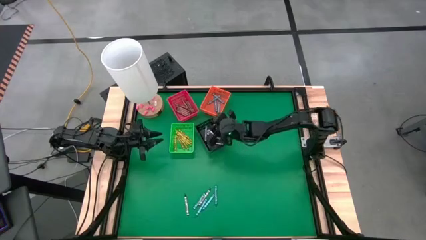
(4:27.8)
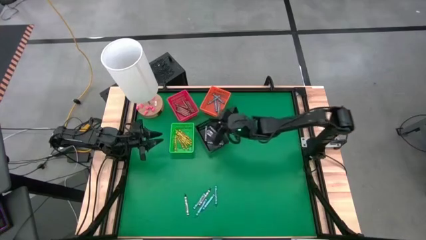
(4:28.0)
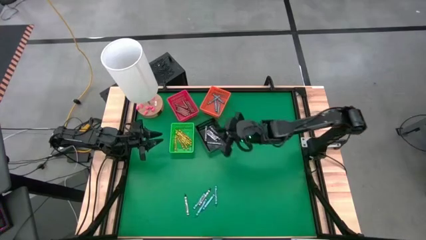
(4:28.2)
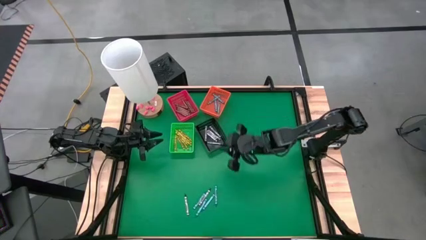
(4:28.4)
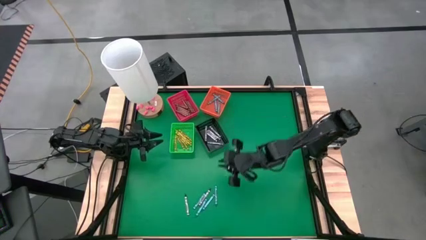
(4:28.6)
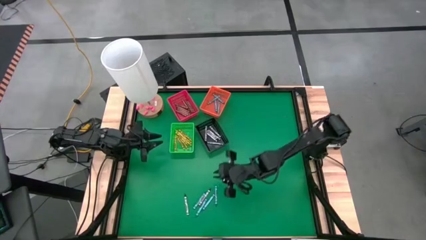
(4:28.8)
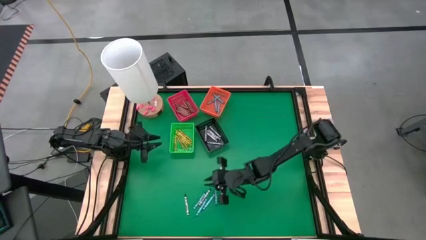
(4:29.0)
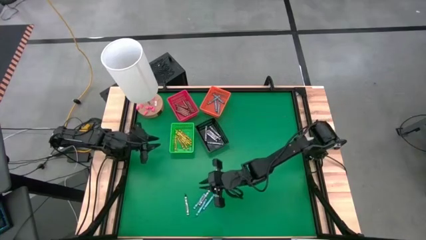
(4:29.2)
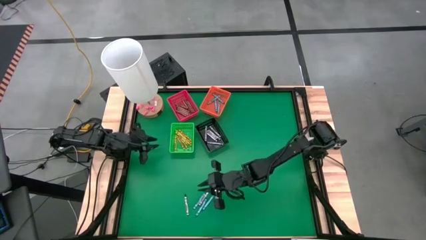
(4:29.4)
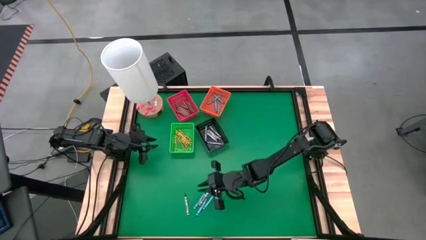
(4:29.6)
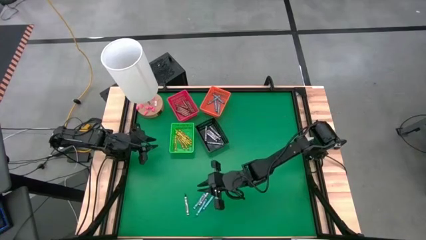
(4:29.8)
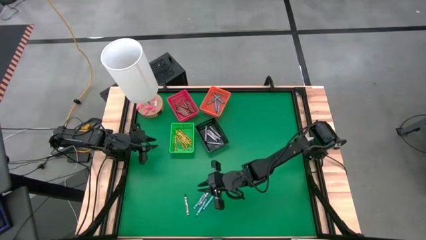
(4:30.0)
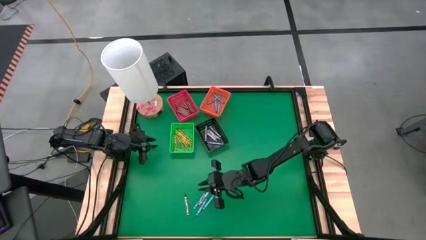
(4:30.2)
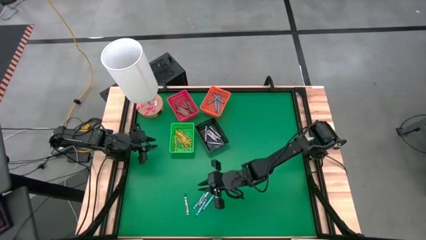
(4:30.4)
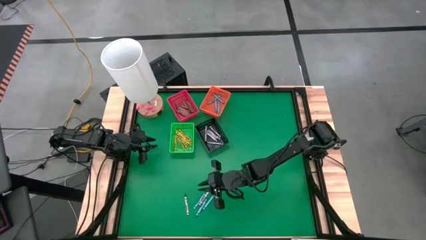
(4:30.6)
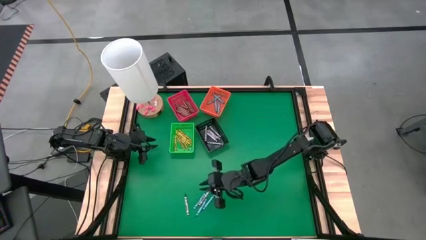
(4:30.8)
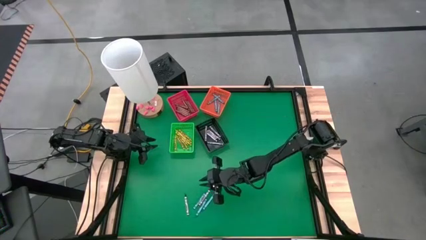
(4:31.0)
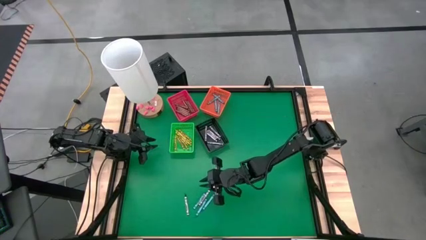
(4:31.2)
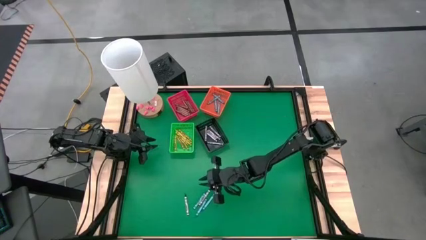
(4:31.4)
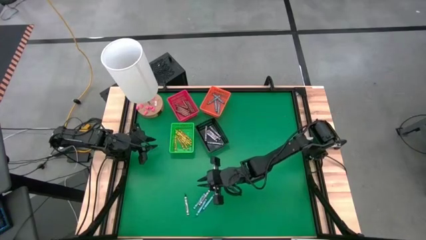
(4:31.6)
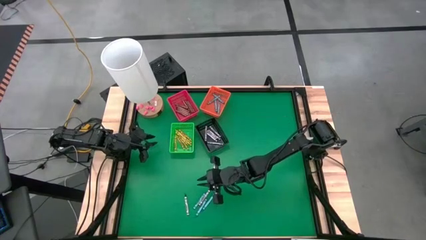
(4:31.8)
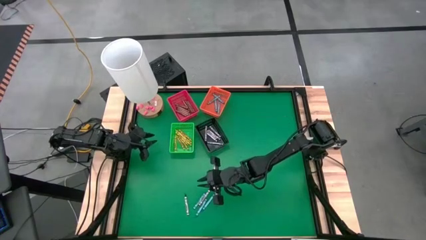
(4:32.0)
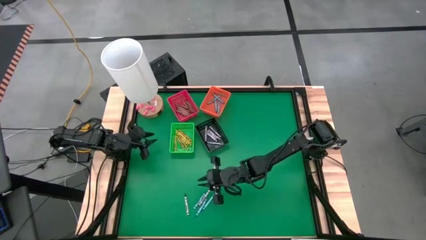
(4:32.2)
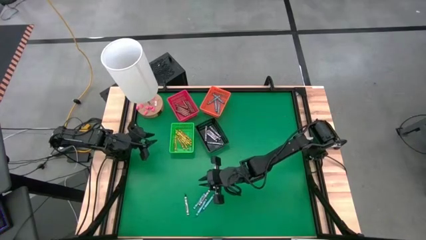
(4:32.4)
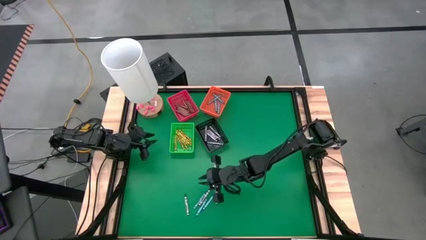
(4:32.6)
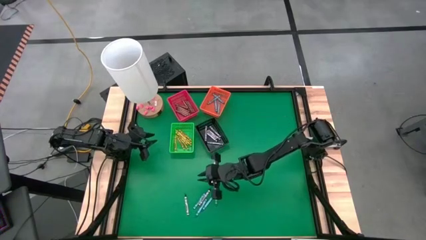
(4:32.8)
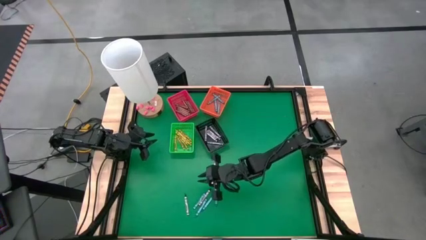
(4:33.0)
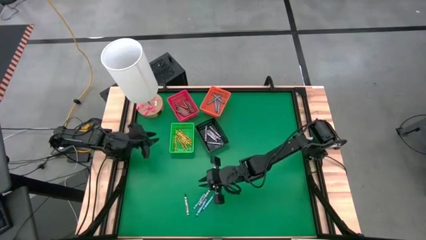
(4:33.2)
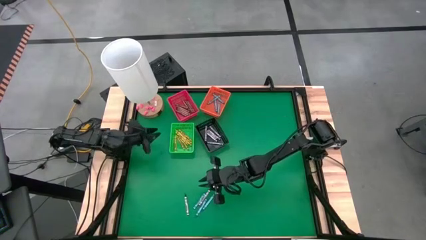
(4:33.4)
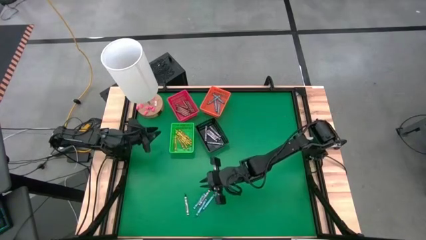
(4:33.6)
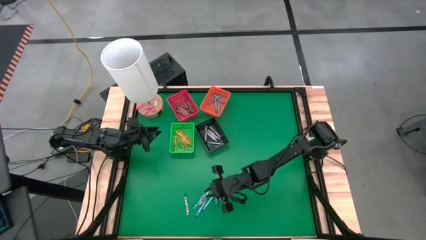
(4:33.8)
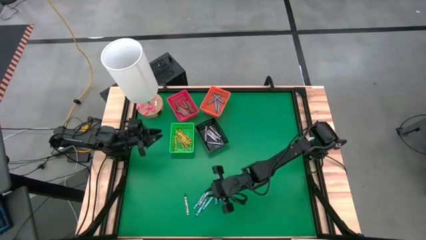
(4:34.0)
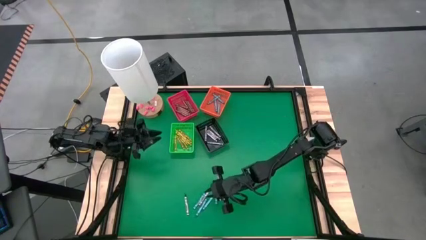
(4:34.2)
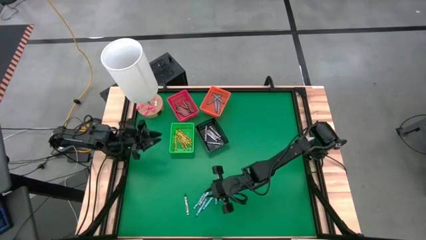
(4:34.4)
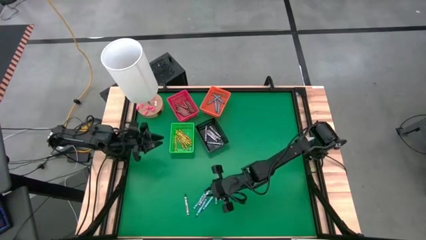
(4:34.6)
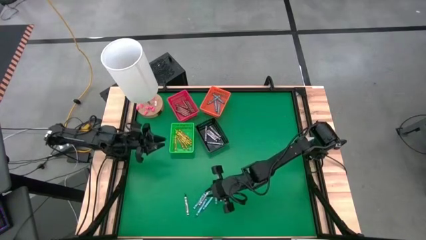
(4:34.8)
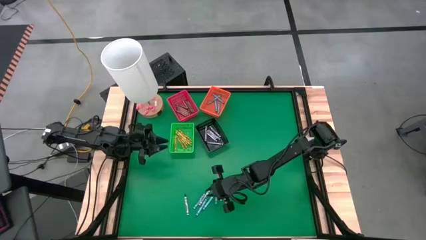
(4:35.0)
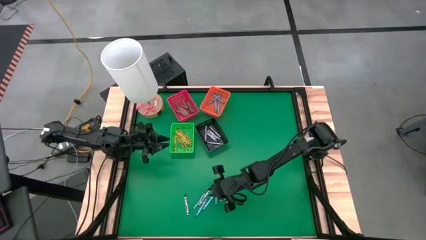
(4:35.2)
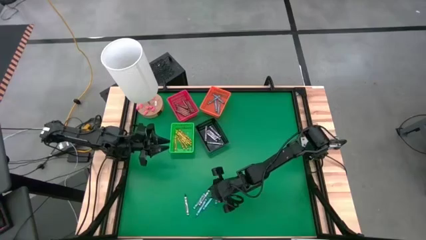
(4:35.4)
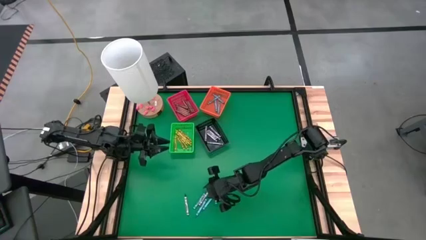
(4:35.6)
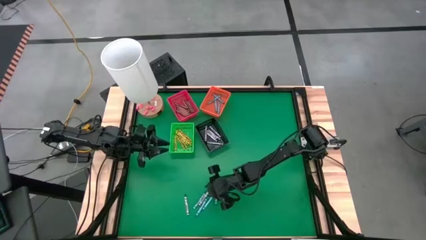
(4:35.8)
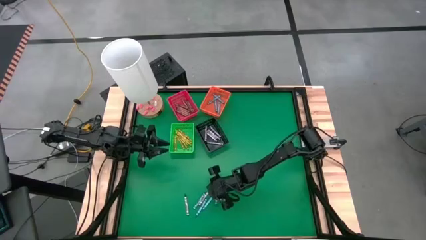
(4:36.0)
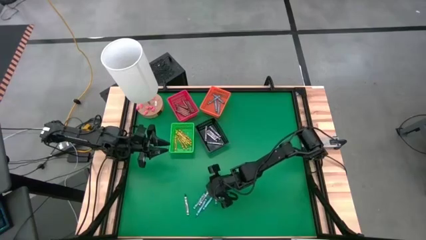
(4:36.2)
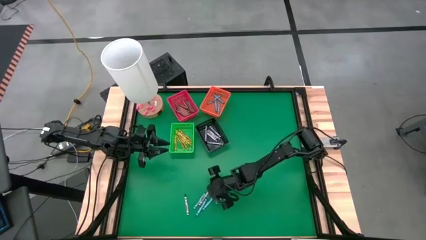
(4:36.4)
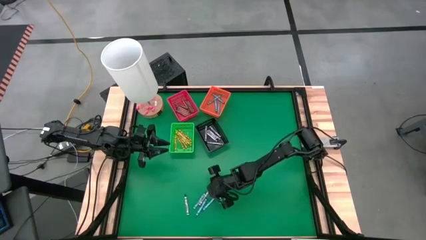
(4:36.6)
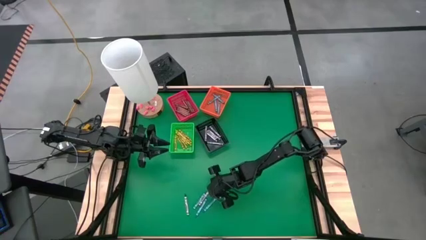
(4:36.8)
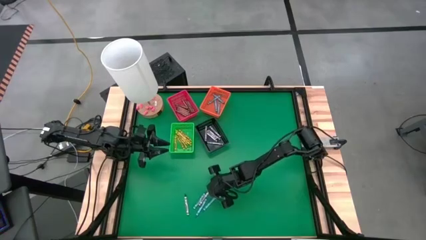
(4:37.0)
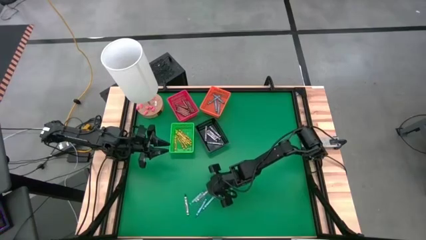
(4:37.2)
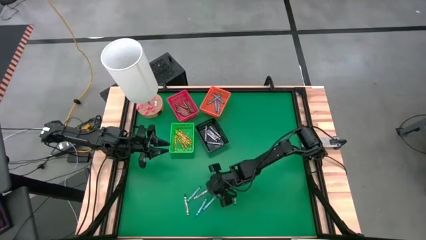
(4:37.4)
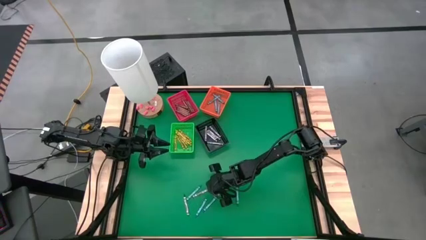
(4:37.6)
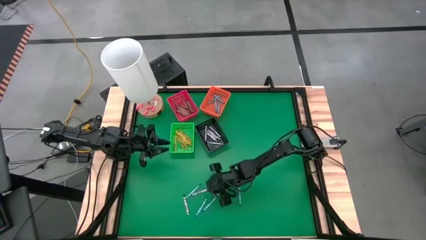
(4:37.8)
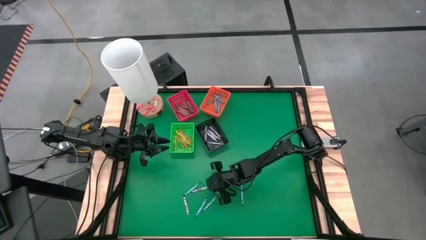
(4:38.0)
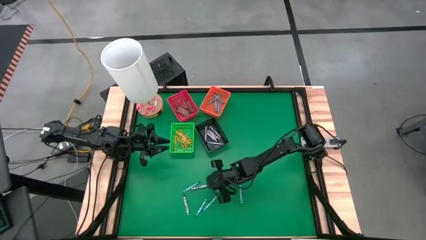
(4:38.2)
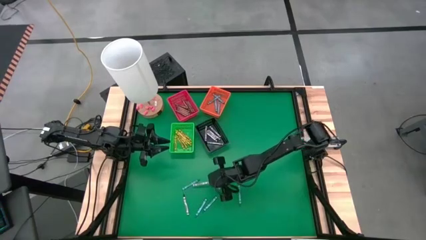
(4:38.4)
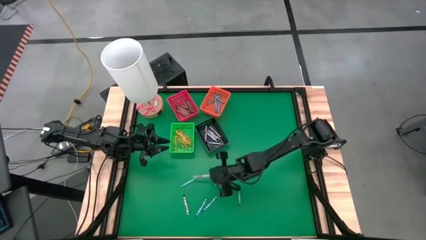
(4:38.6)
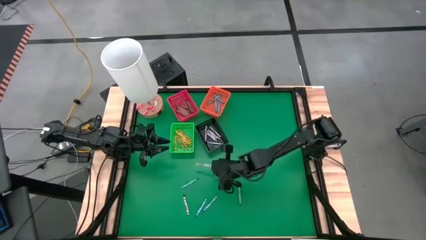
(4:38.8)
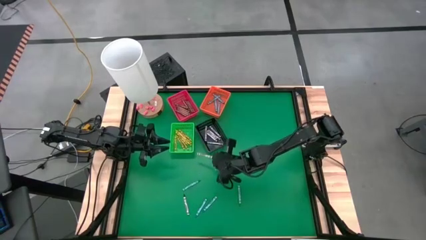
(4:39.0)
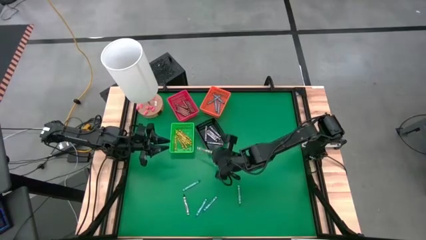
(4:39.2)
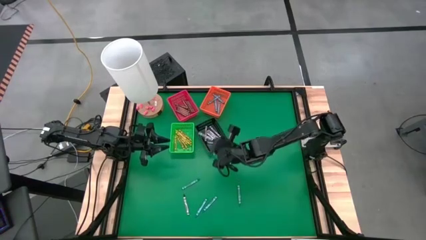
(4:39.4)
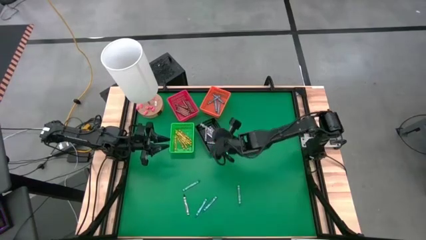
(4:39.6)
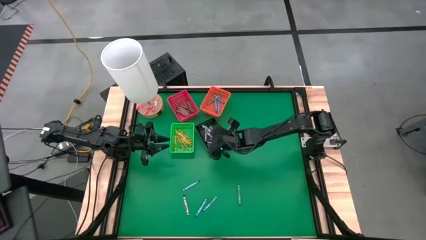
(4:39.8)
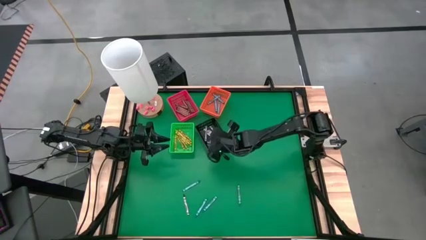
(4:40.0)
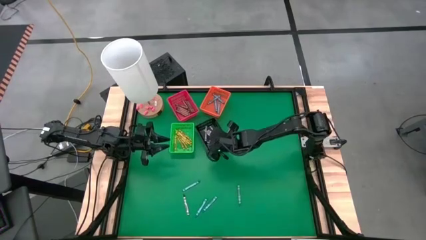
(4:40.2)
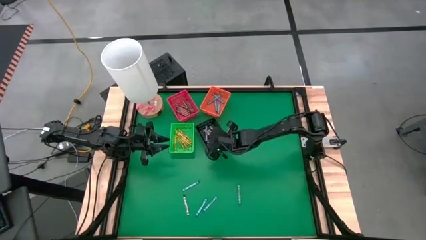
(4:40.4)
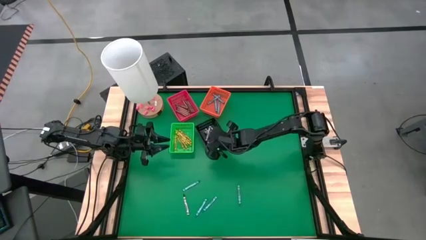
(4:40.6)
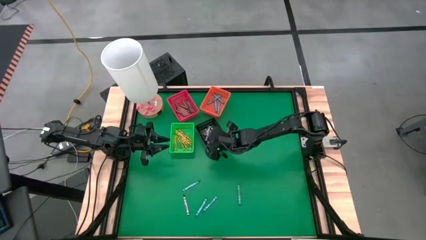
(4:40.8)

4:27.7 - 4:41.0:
Task: Sort crayons
Put the black crayon into the black bin
